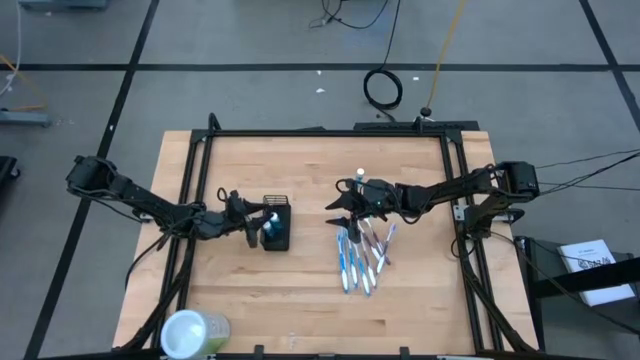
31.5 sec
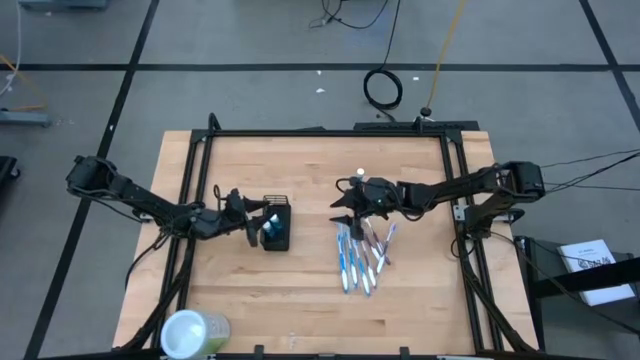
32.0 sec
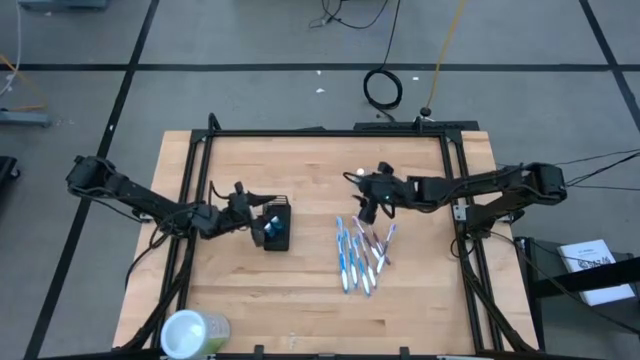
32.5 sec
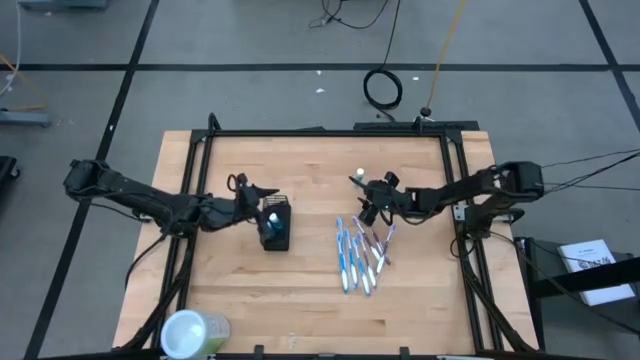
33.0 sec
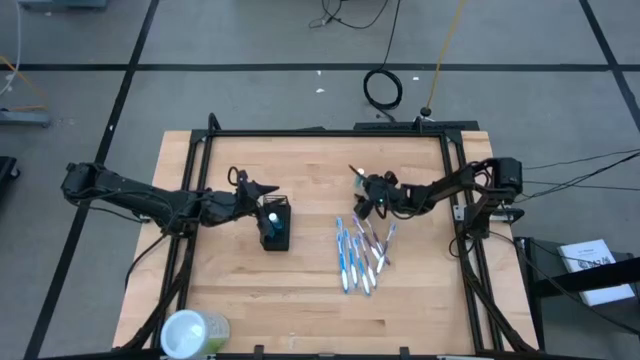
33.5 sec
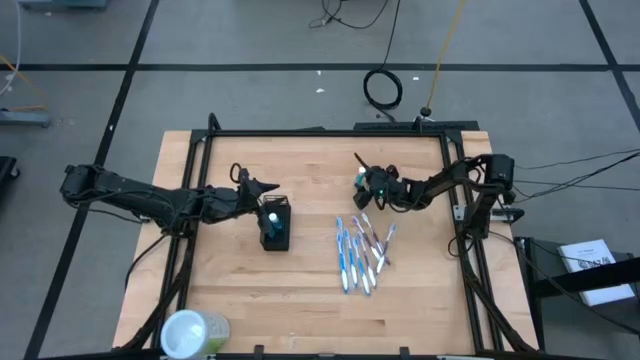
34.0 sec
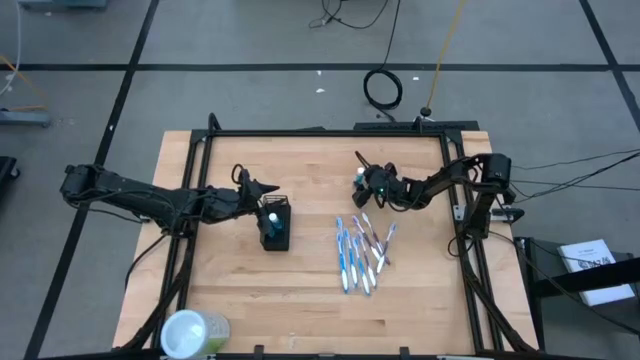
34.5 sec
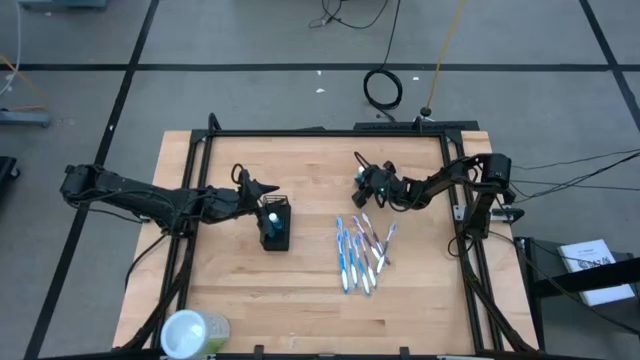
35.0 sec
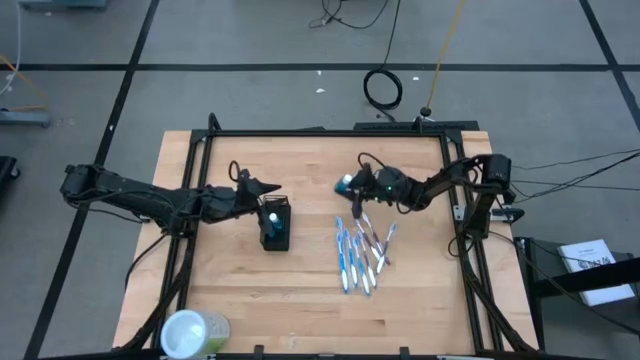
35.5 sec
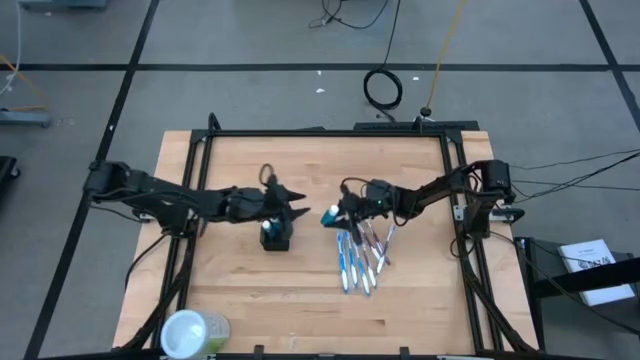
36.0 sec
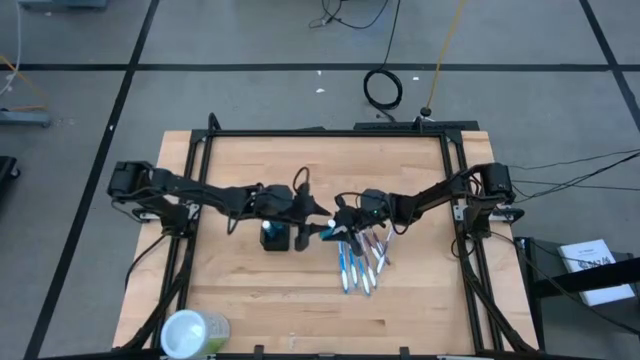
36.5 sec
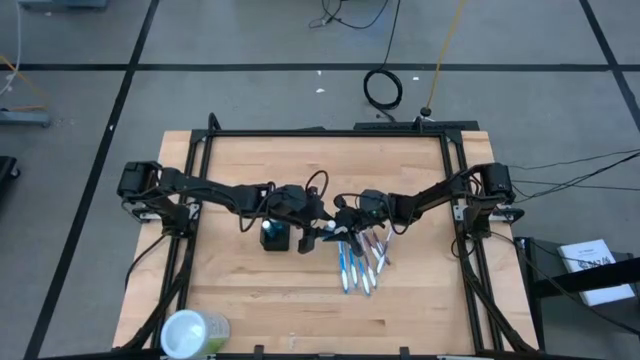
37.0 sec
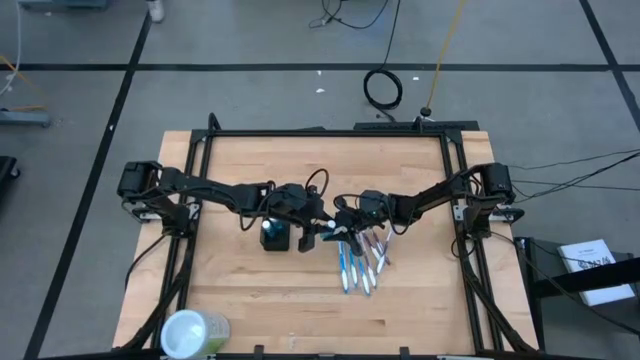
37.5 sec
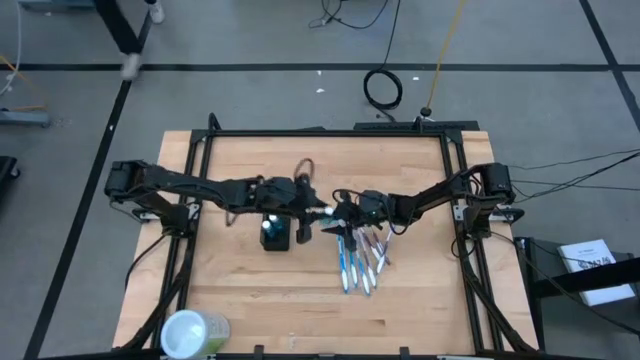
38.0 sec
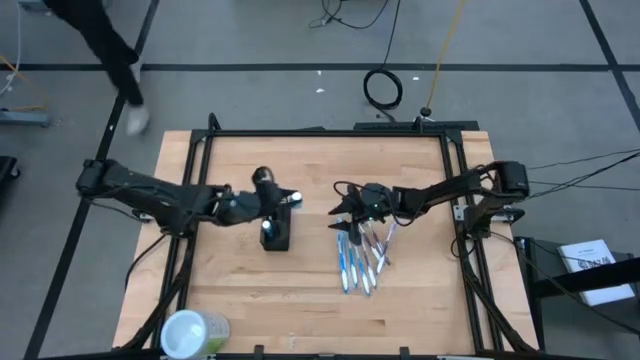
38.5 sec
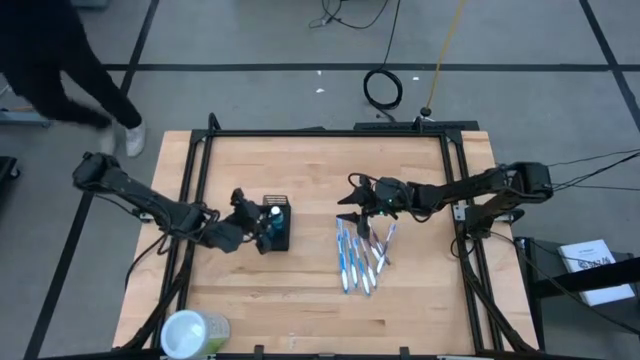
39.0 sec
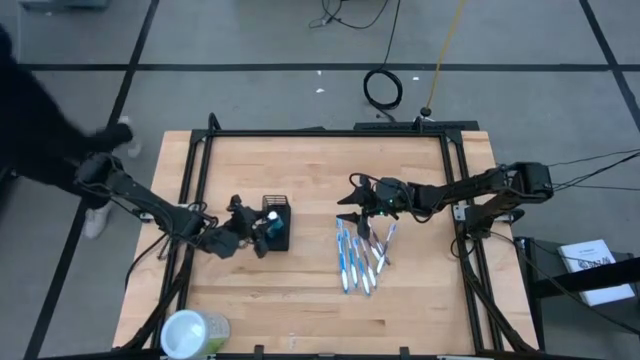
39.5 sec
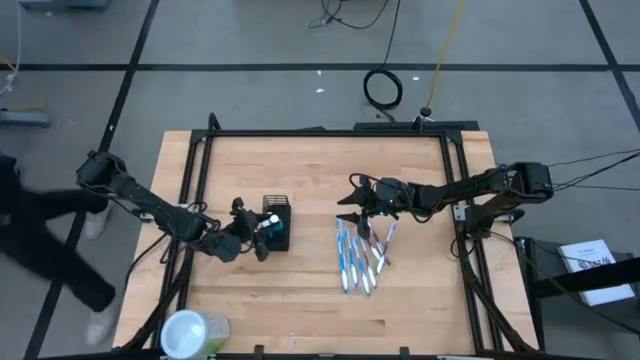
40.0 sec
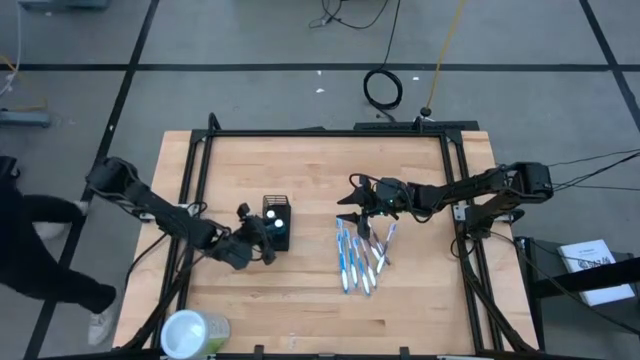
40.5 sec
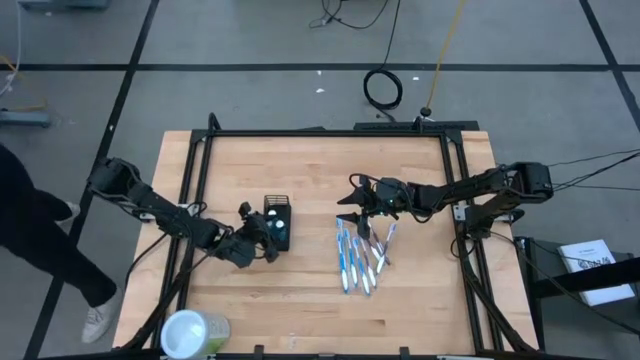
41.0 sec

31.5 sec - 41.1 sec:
Task: Pick & Place toothbrushing station
Put the mouthwash bottle into the middle compartment of the mesh organizer

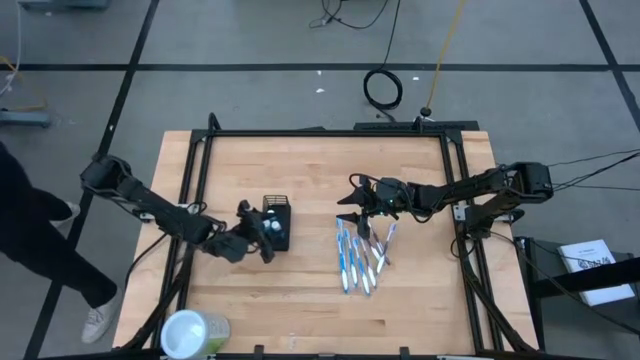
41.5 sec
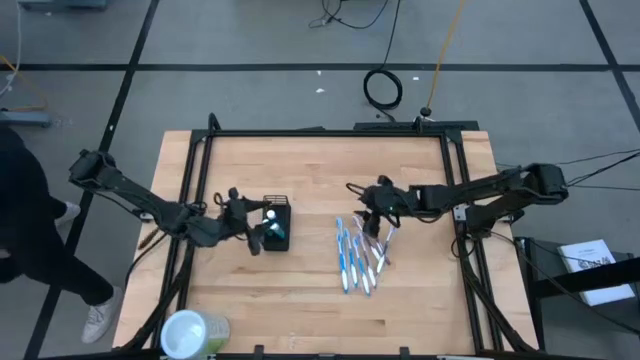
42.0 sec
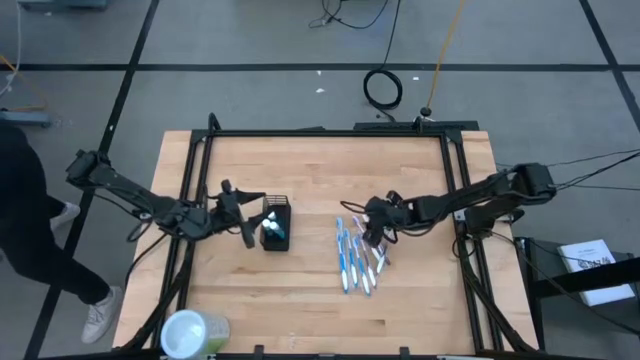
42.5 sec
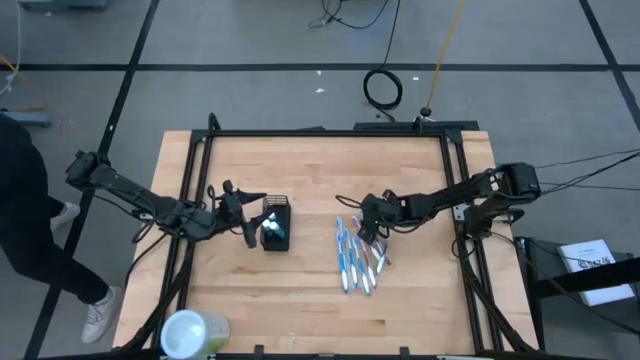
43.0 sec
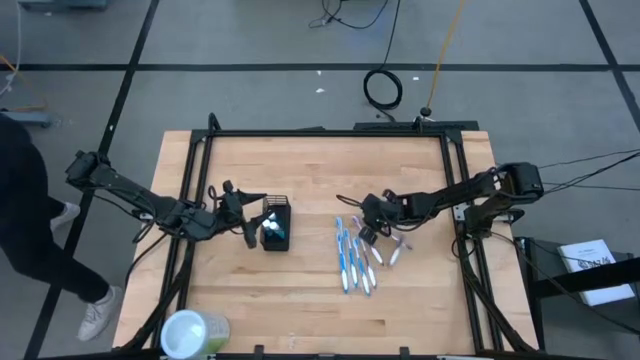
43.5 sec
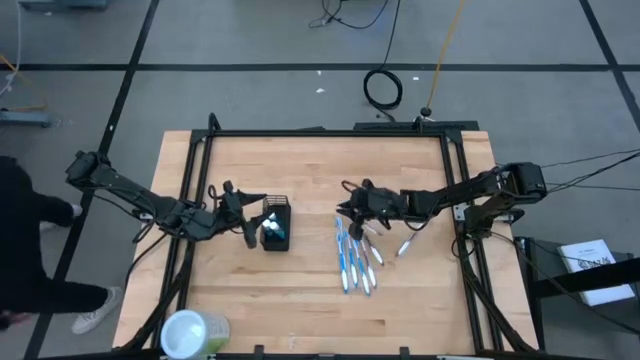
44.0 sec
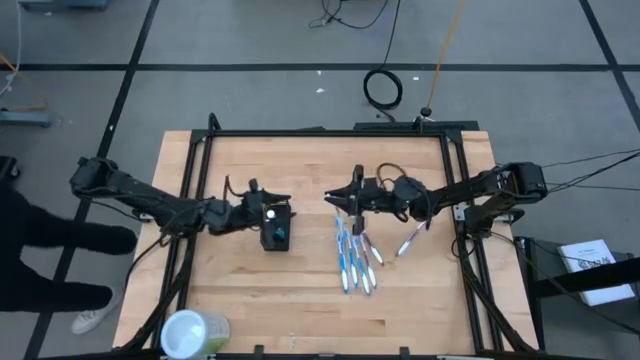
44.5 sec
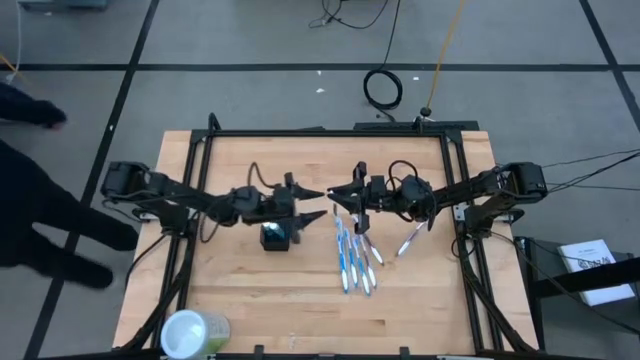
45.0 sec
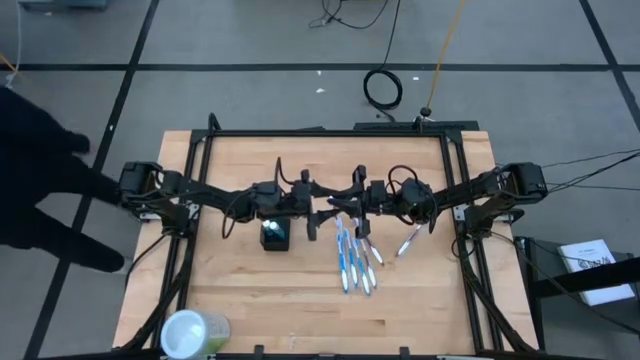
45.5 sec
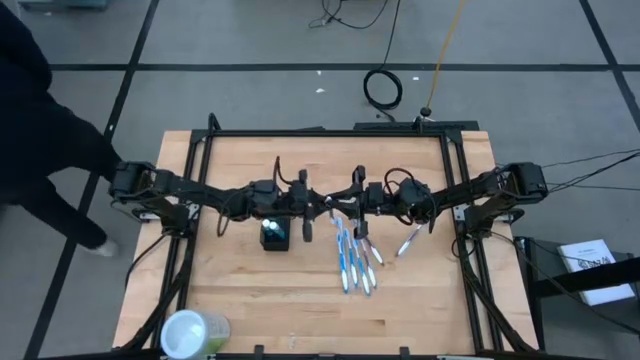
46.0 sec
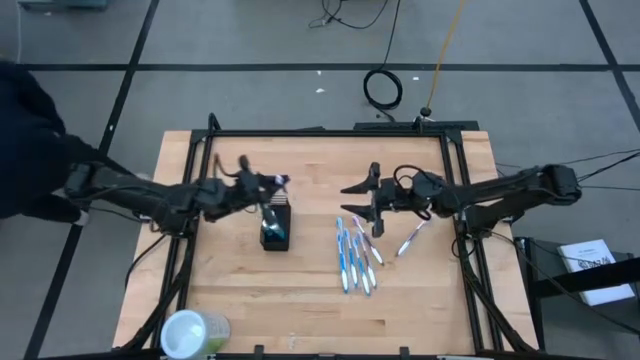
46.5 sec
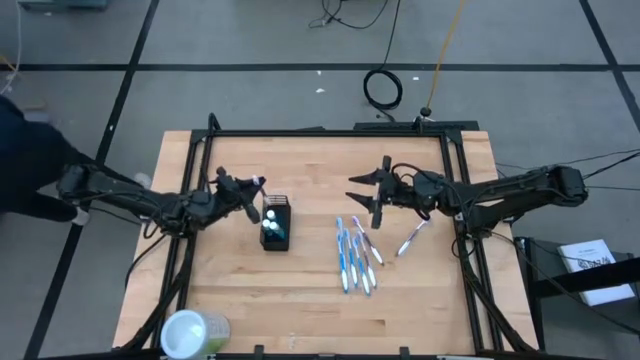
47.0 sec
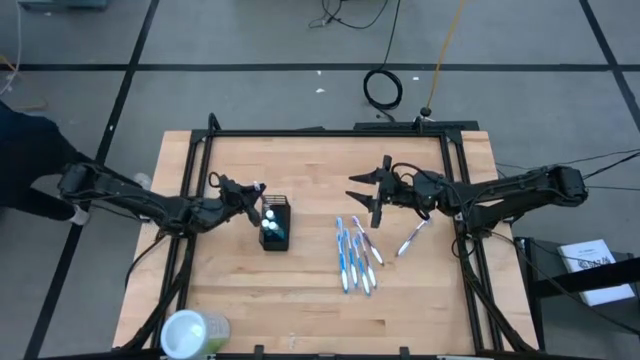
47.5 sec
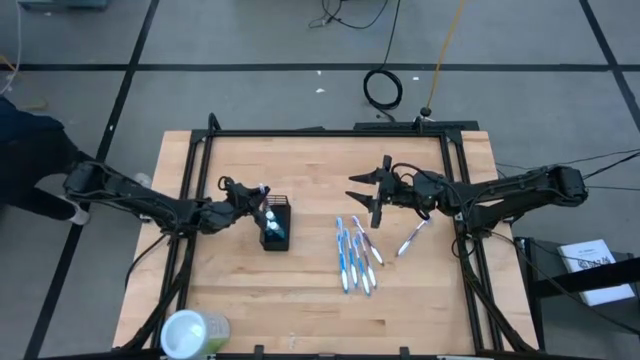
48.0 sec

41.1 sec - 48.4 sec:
Put the purple toothbrush into the top compartment of the mesh organizer

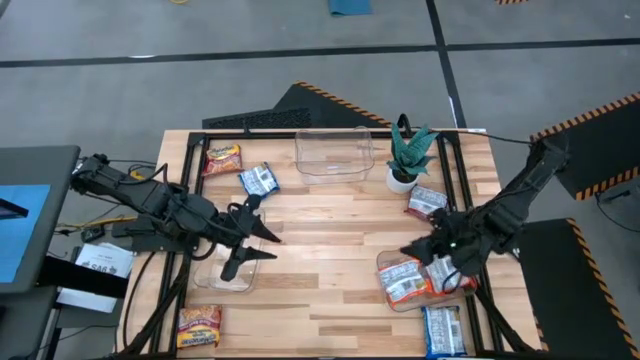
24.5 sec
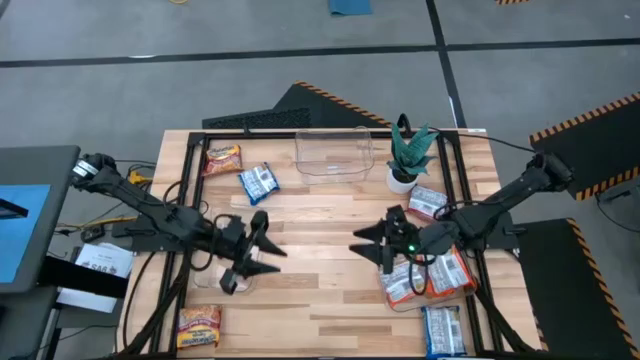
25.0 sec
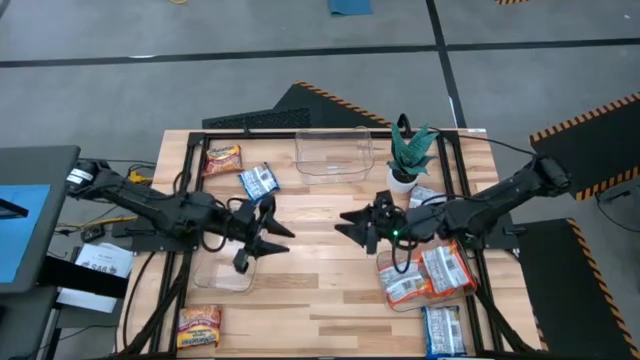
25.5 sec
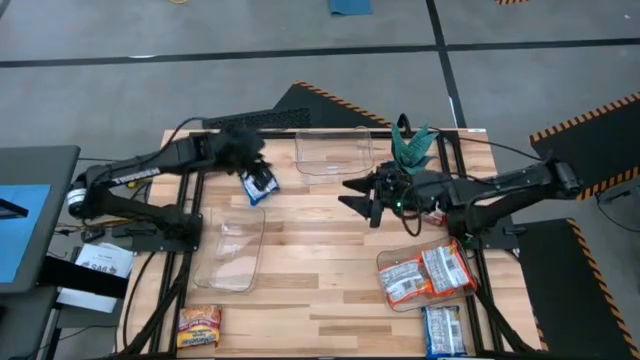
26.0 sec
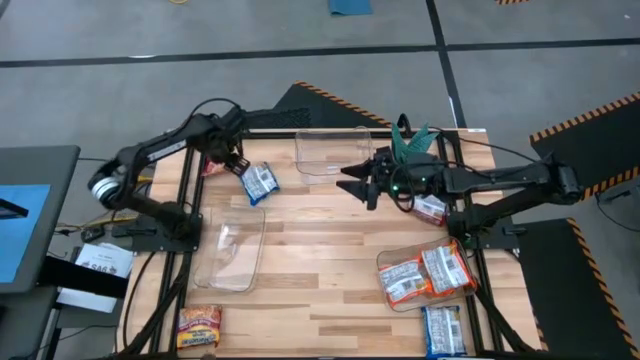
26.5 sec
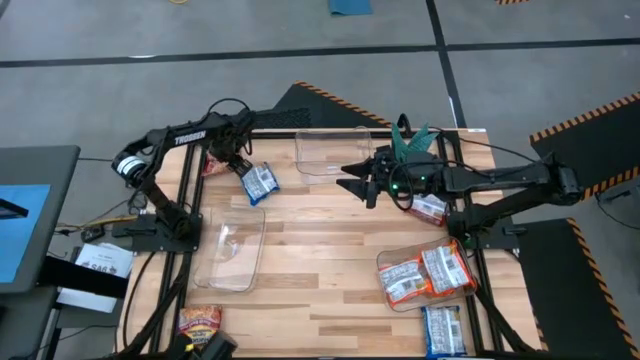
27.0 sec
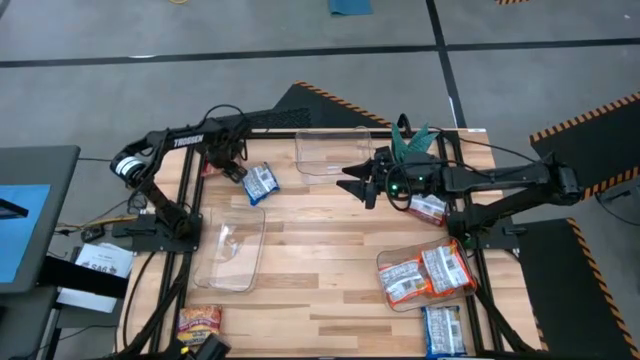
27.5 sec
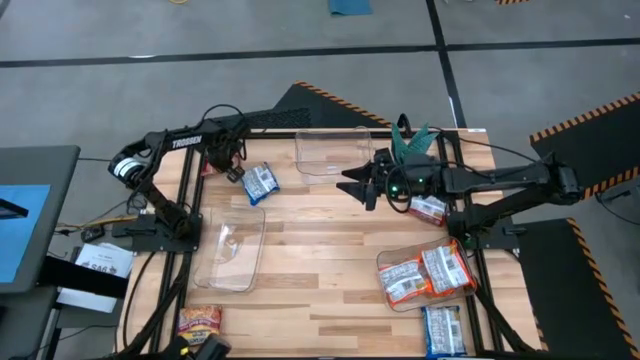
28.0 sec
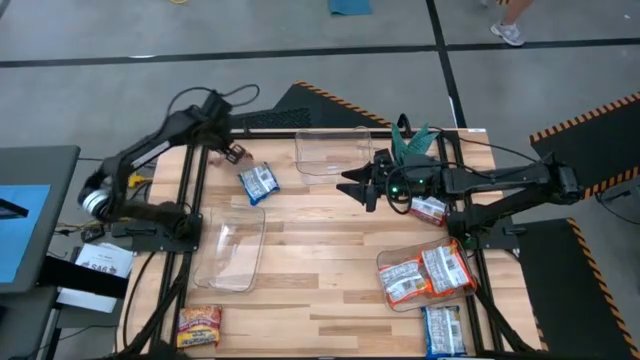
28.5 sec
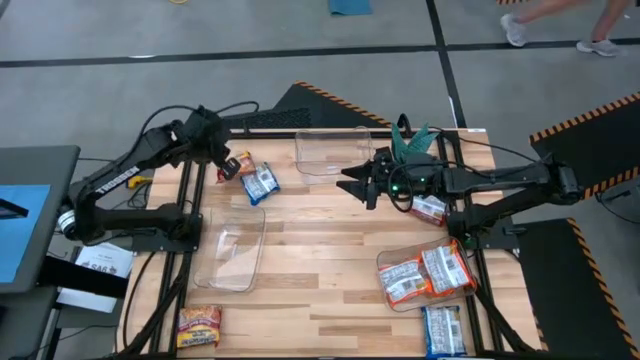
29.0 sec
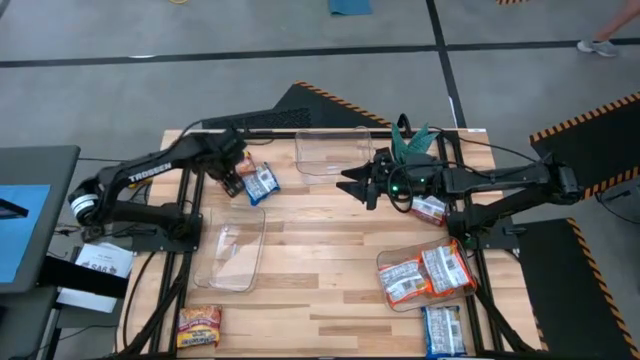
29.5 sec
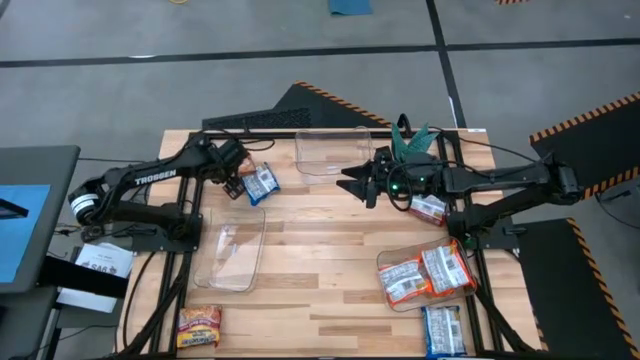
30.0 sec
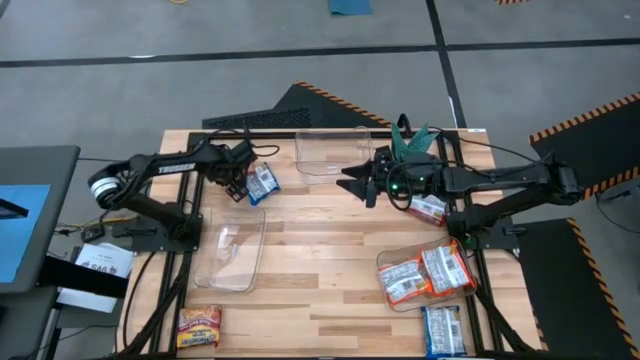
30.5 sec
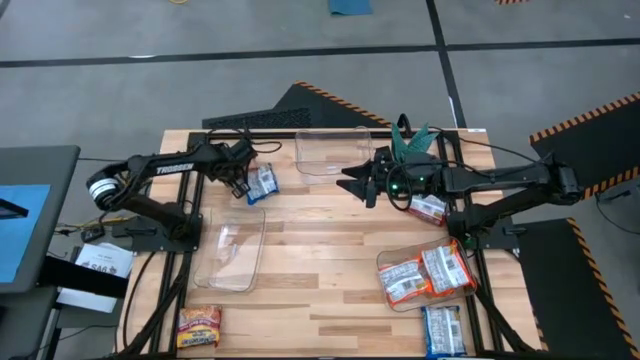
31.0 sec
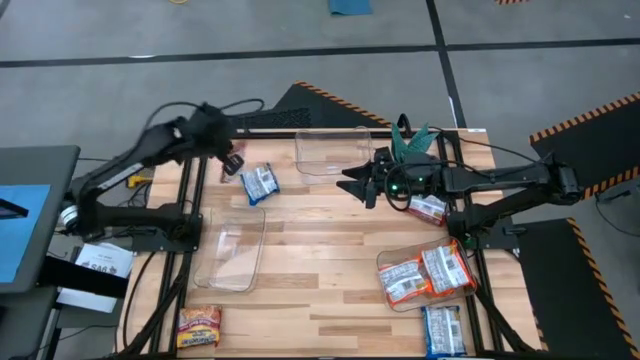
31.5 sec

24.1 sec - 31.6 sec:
Task: Sort Maruchan noodles
Put the top left red noodle pack into the bottom left transparent bin
